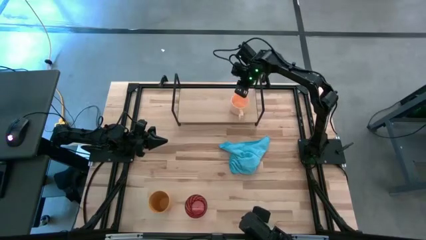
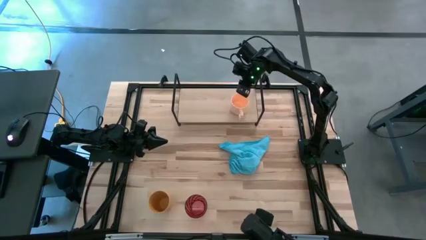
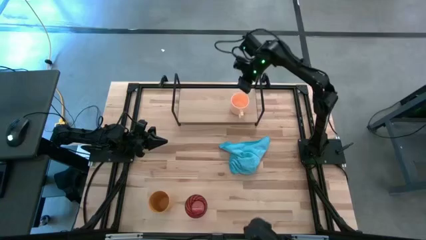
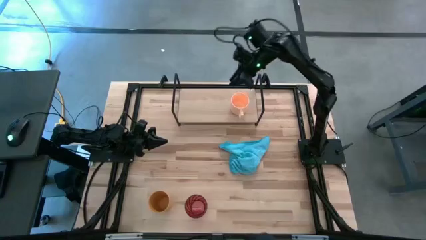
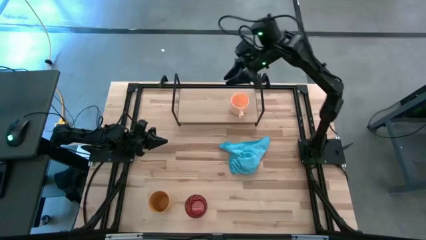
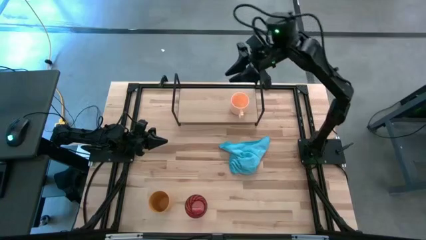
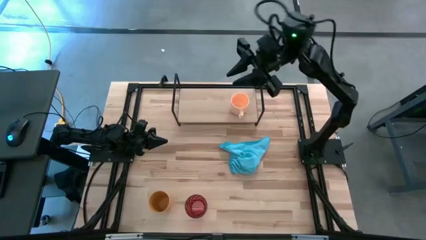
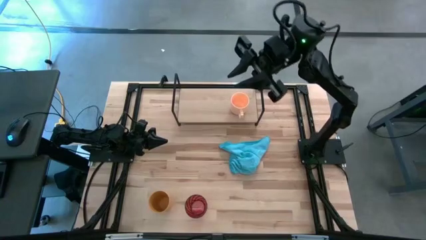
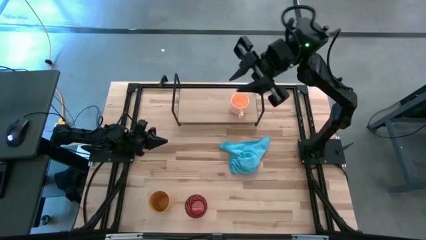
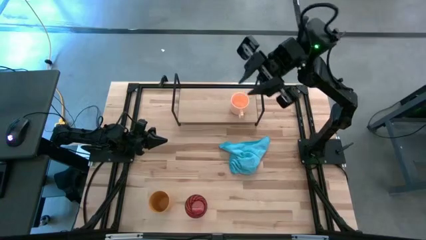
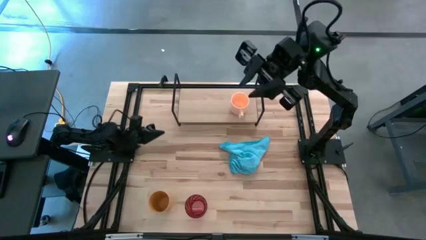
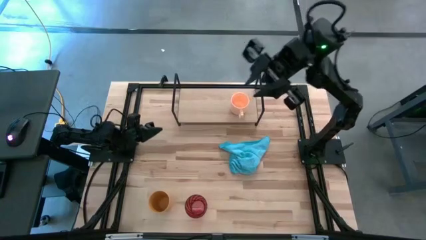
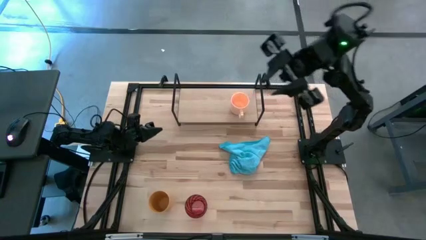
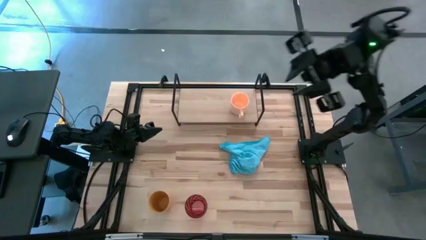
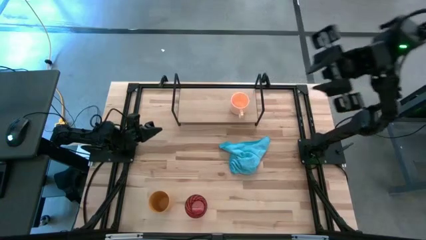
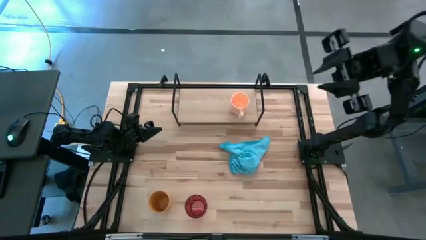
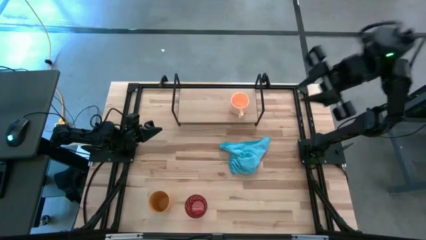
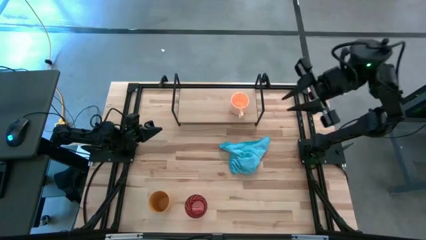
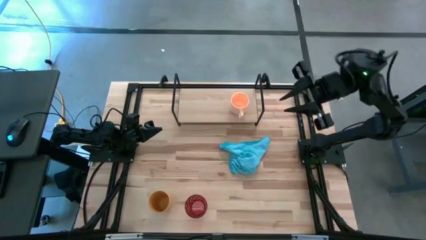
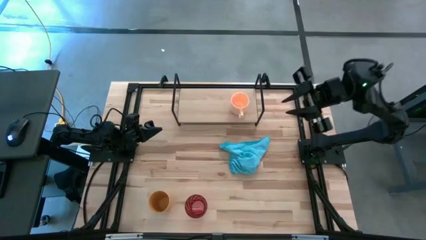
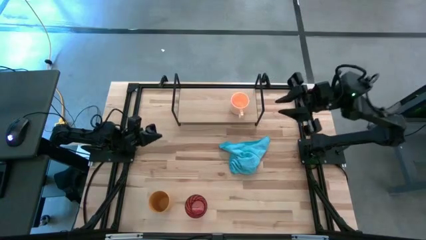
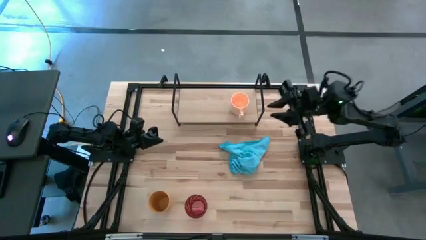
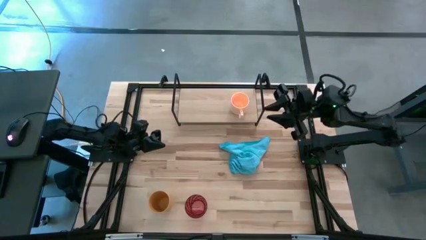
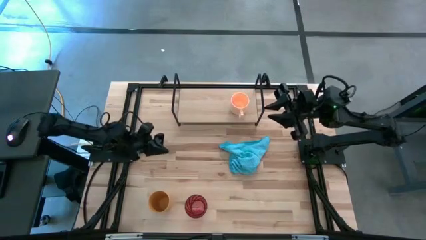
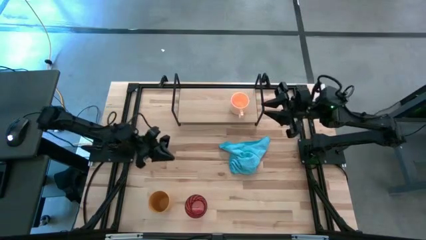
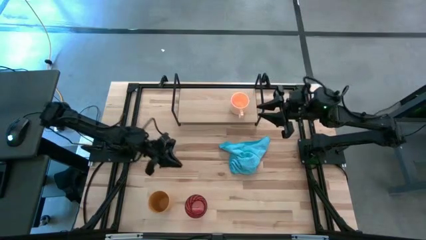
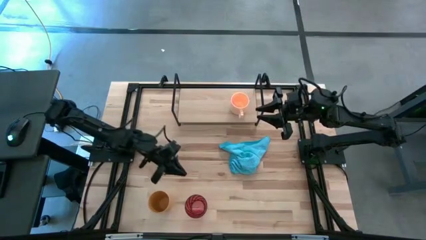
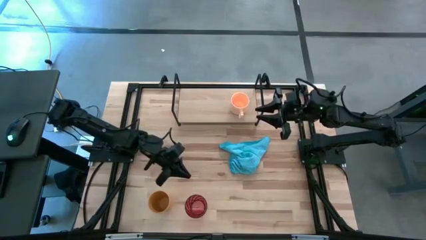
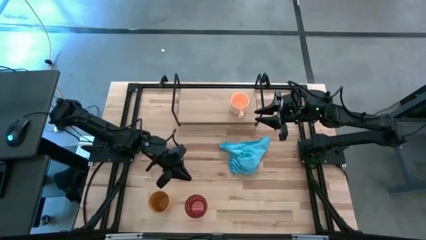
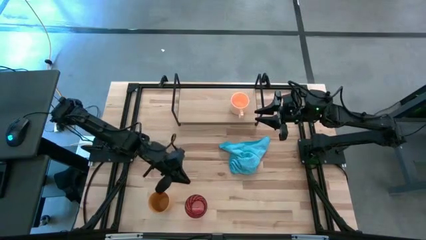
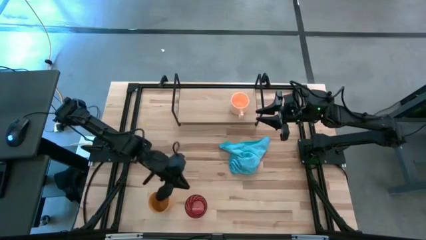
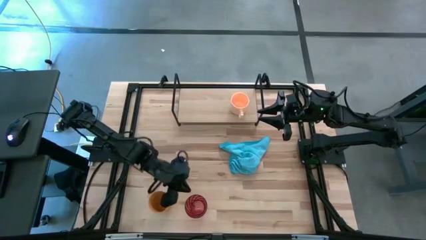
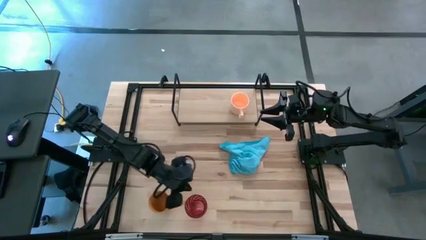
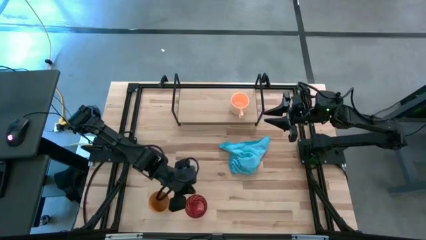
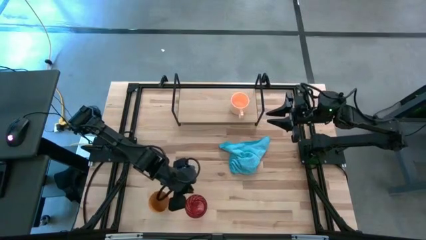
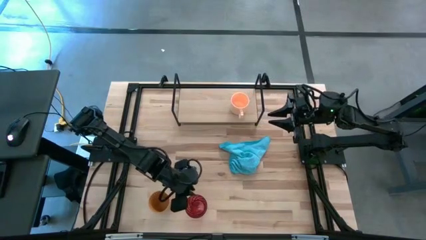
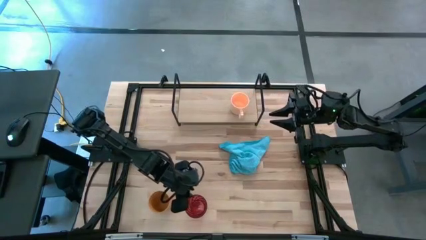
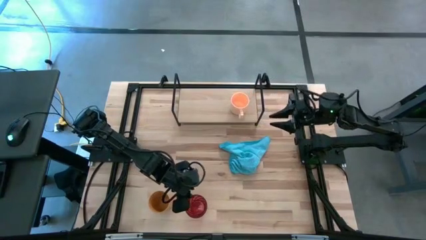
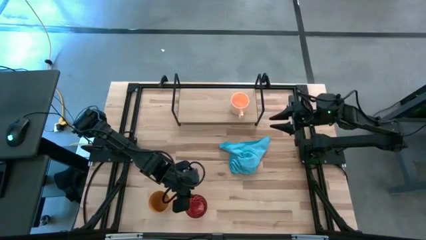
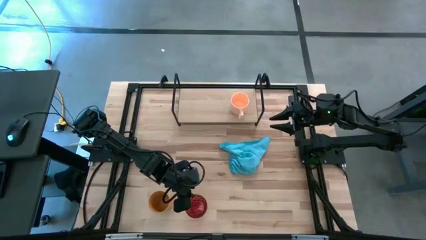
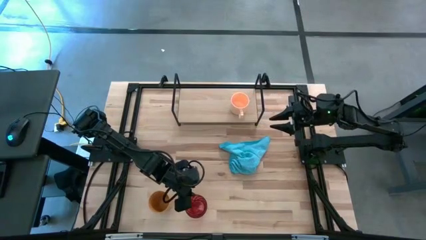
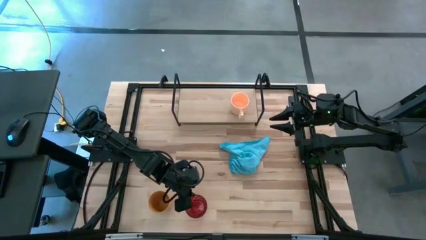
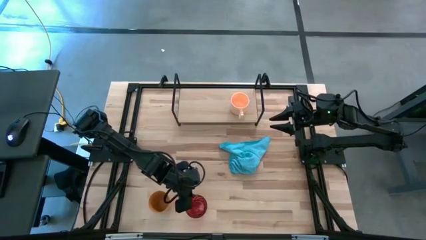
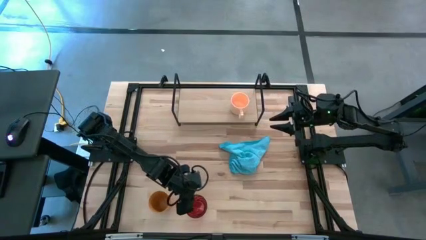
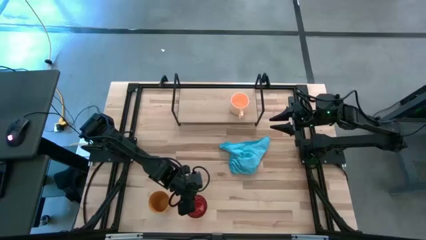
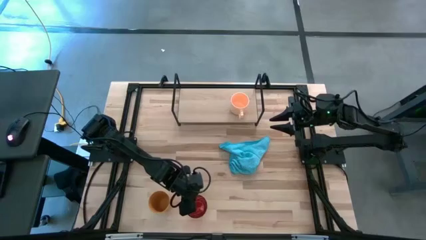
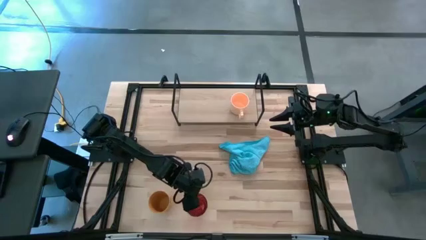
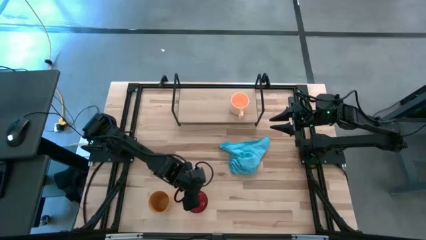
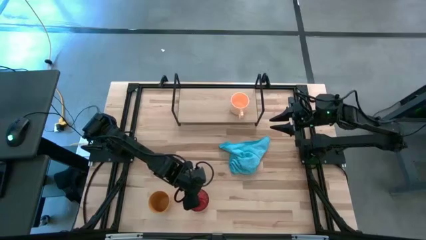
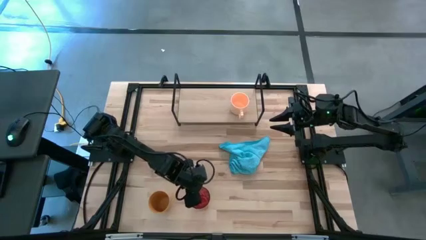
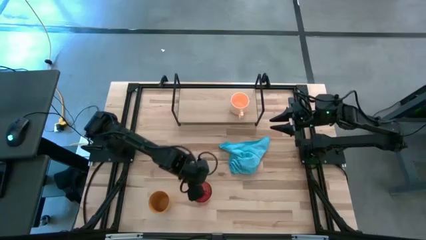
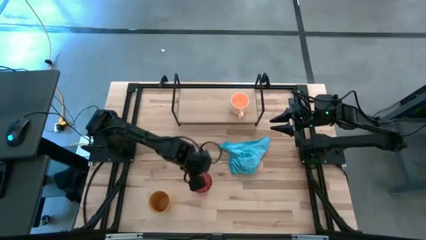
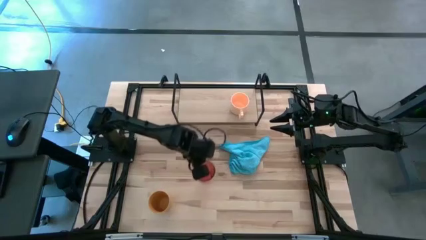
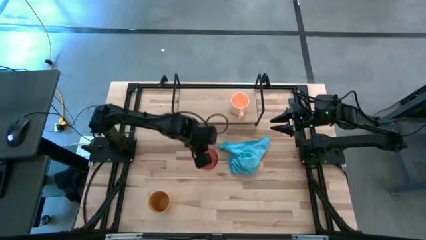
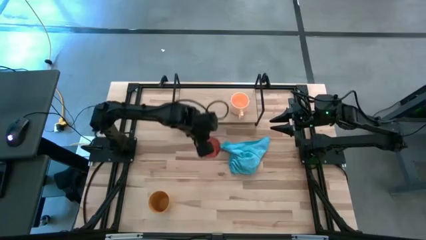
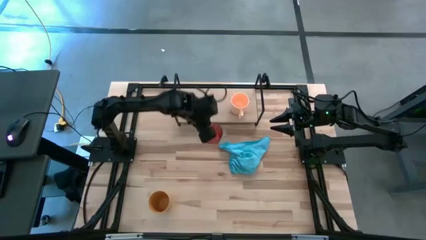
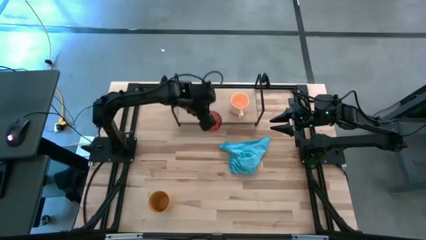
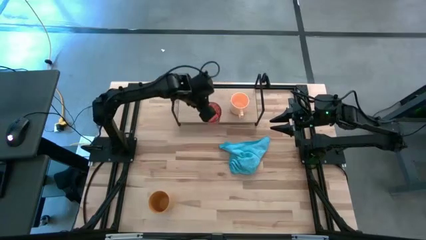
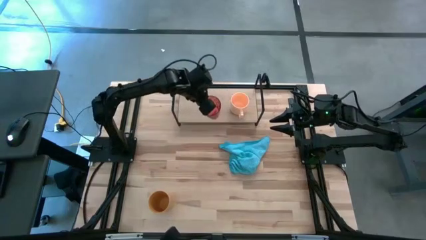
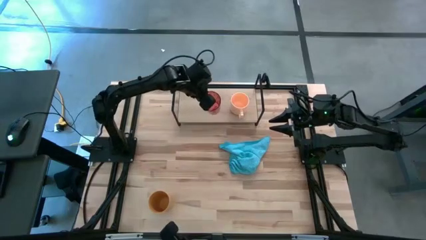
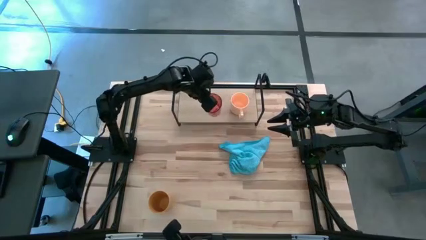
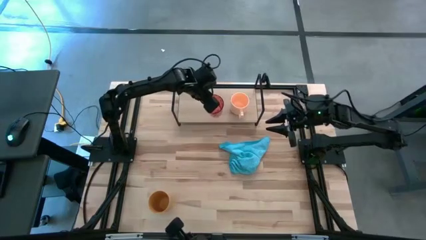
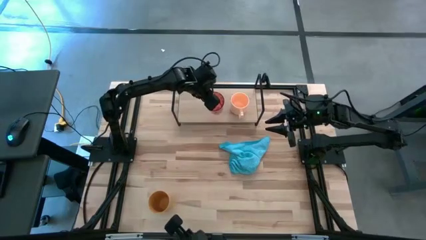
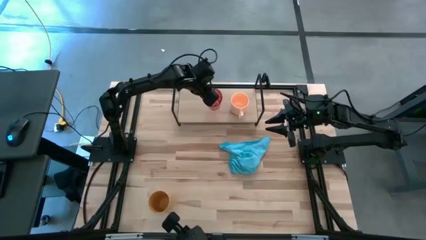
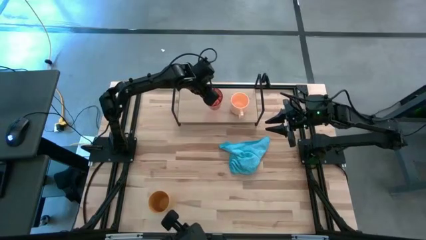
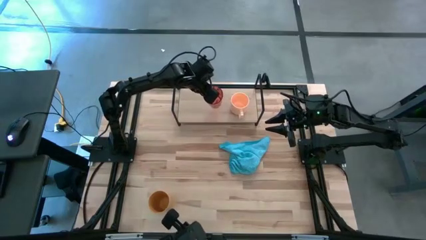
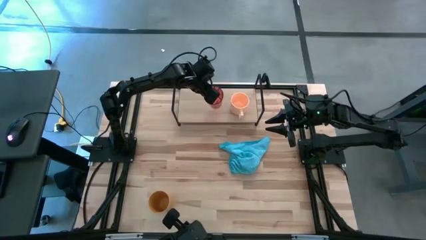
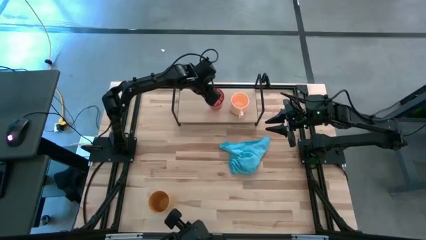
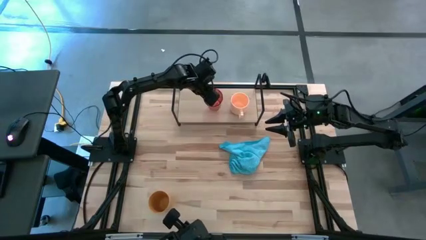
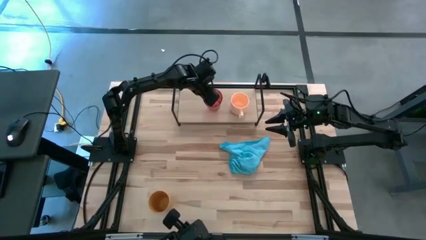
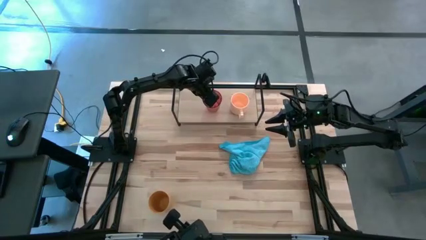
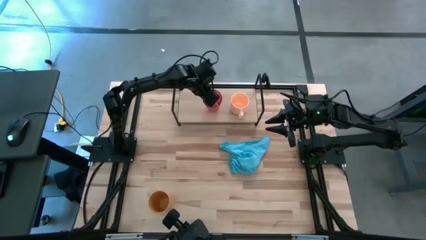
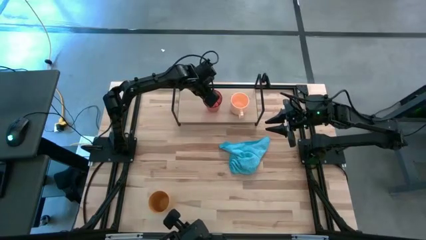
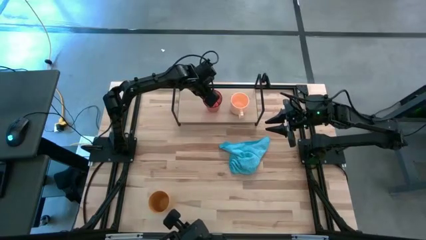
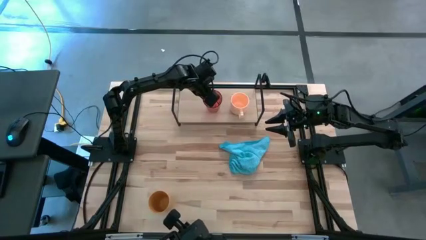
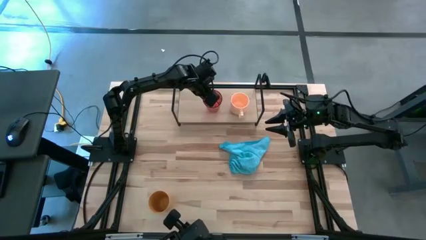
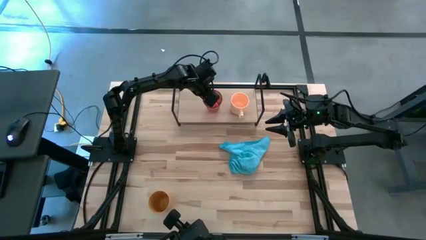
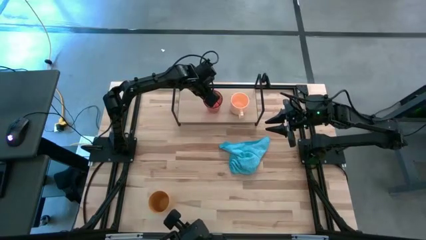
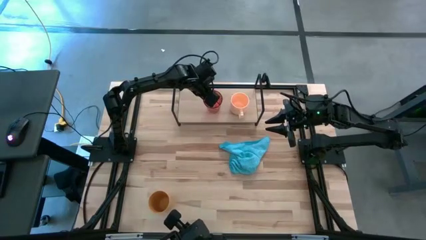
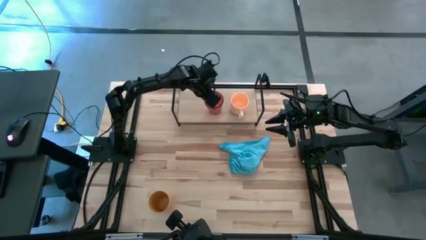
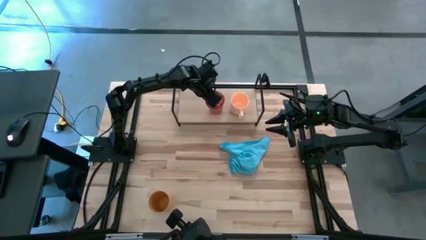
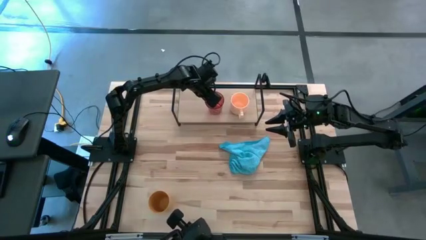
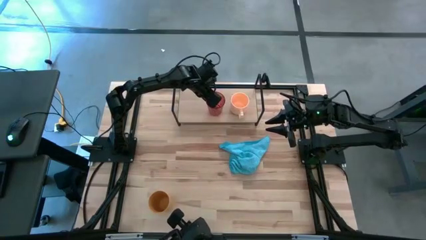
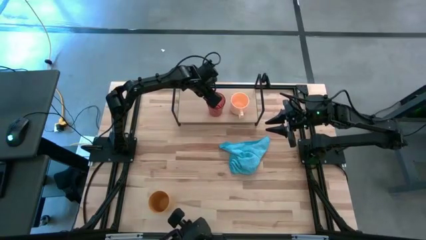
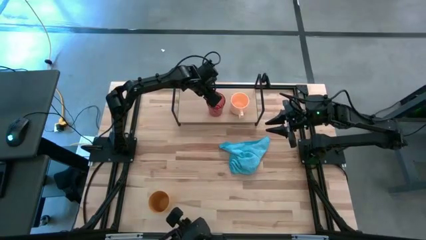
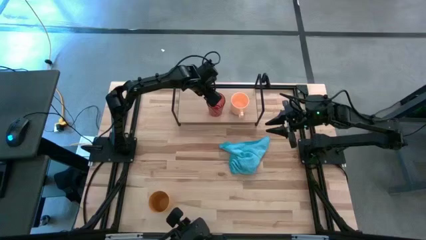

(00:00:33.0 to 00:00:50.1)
Task: Stack small to large cups/mugs on shelf
Put the red cup on the shelf
